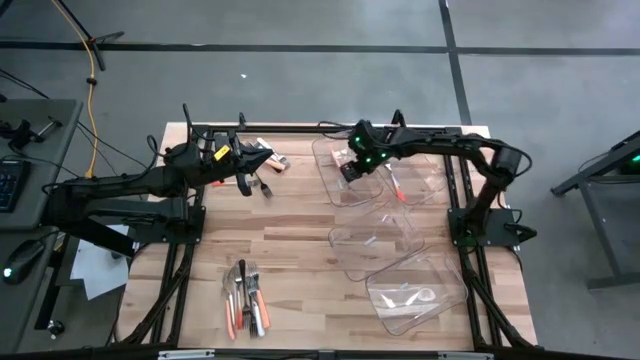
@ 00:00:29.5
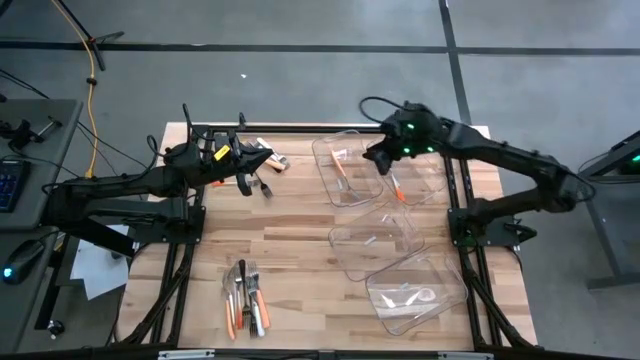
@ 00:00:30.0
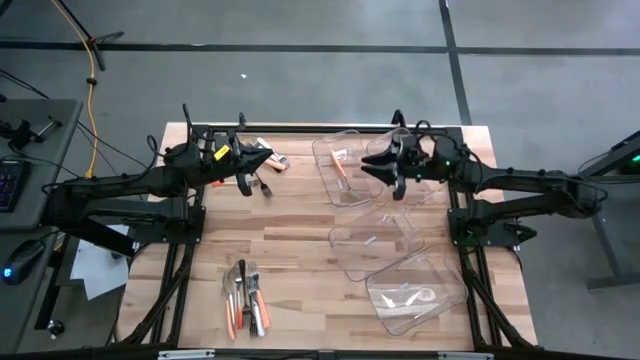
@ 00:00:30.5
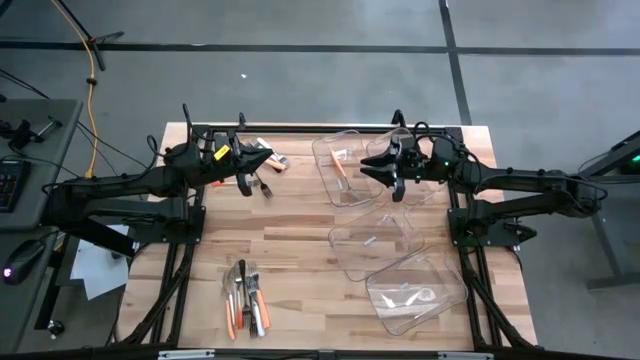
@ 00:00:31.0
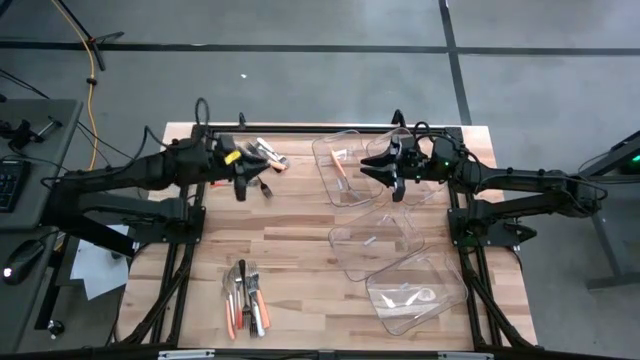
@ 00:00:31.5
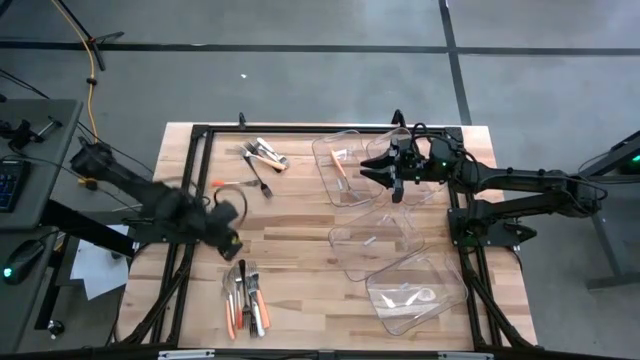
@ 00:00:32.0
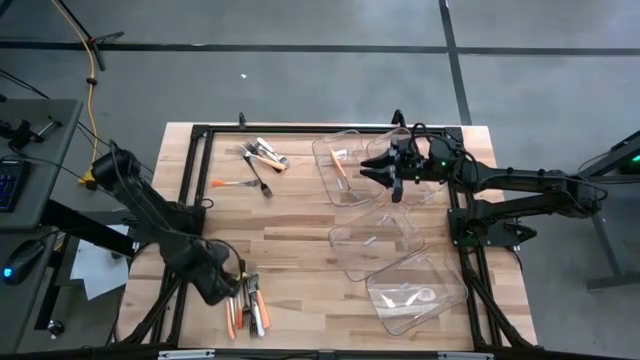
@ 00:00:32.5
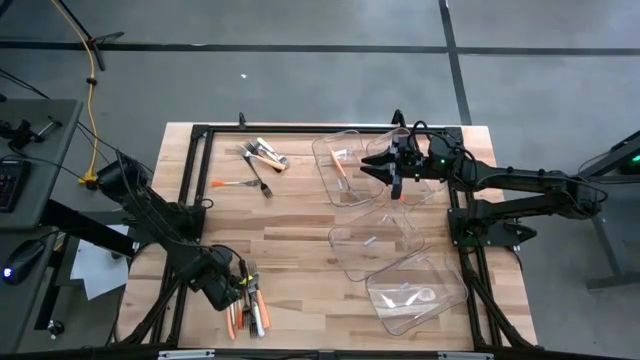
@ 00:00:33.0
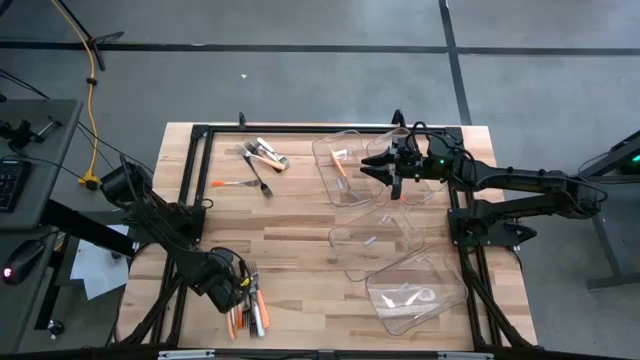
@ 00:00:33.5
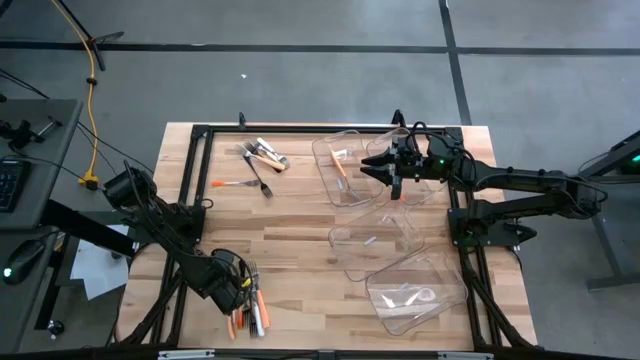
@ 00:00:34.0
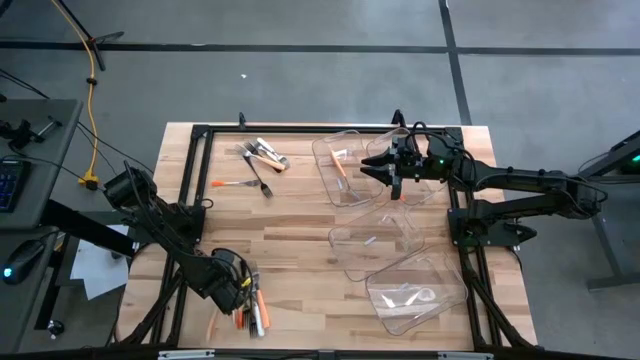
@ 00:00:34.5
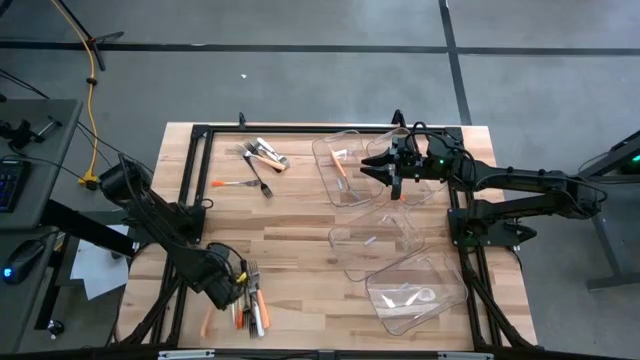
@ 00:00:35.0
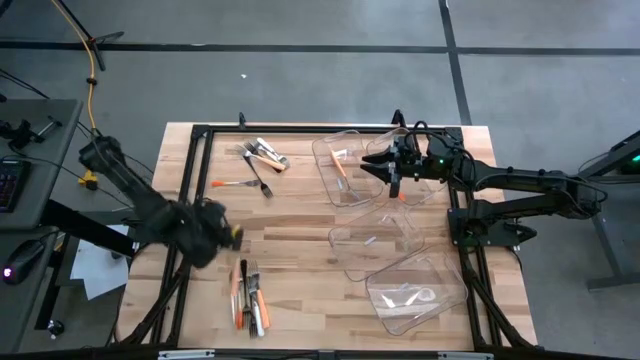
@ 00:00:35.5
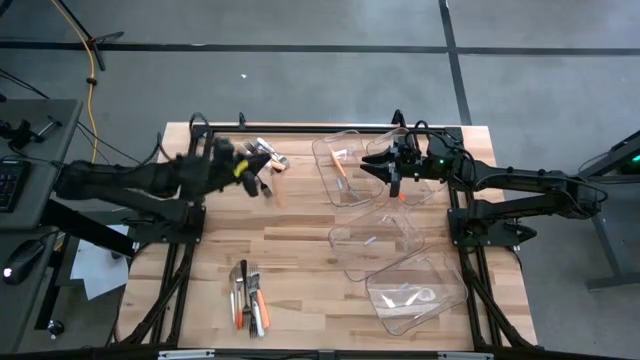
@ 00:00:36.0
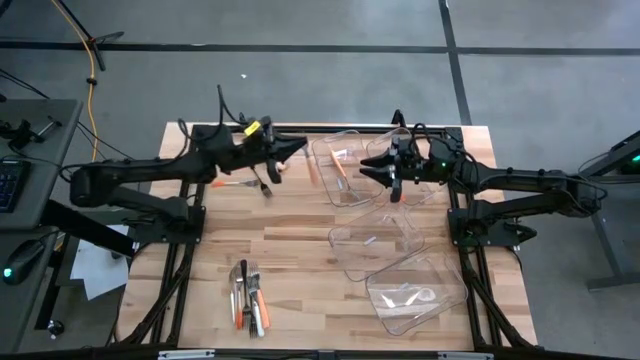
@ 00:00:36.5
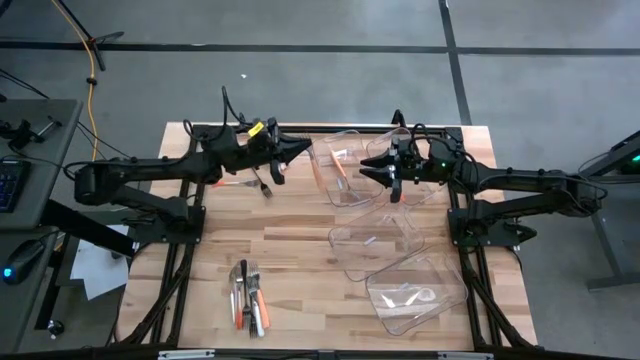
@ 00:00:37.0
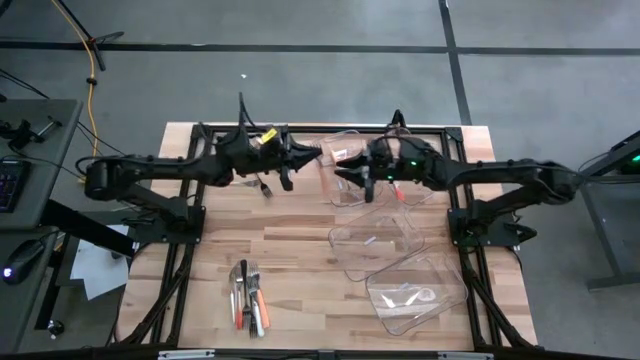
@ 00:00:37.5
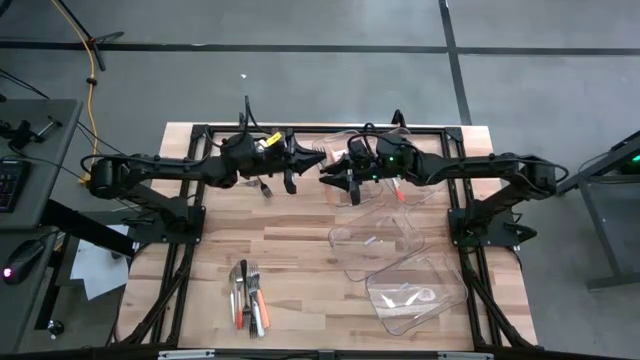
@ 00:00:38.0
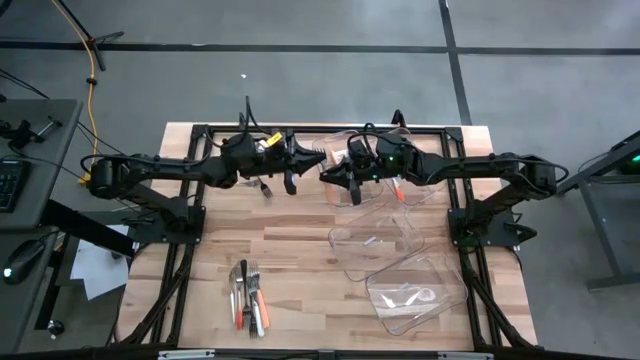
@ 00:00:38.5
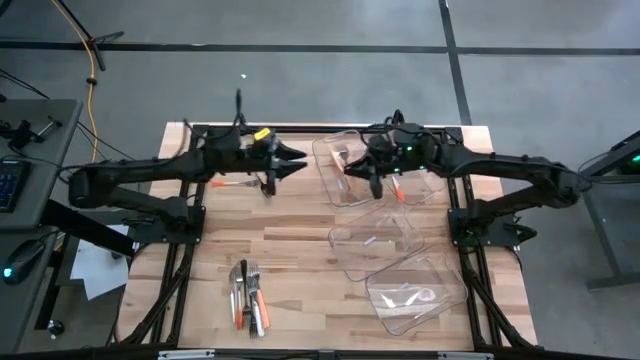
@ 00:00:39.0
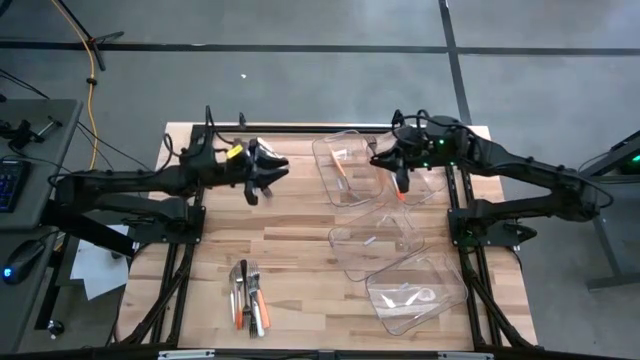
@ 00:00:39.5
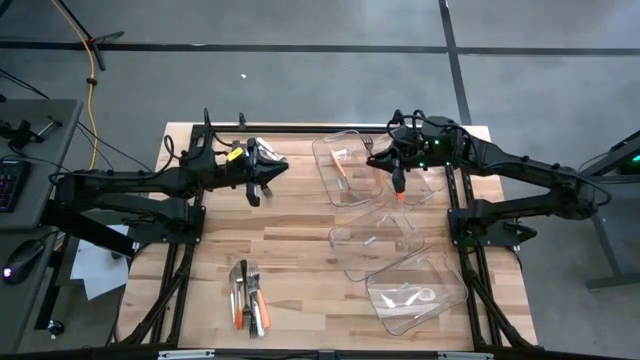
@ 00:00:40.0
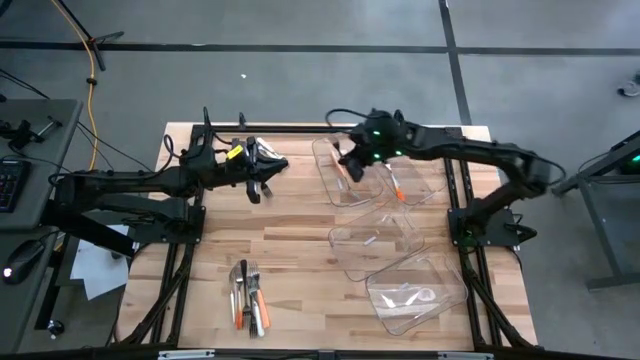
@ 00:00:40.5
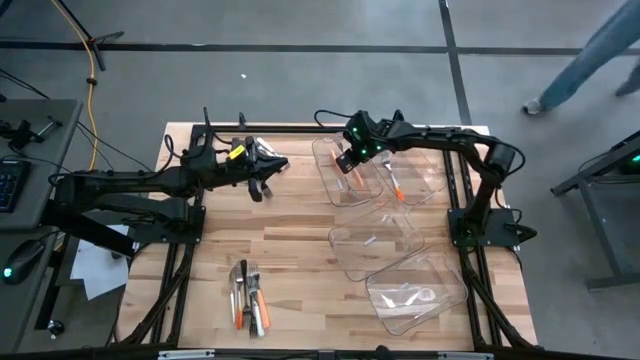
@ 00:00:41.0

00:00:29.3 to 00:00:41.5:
Task: Sort silverware by color (type)
Put the light orange fork into the left transparent bin

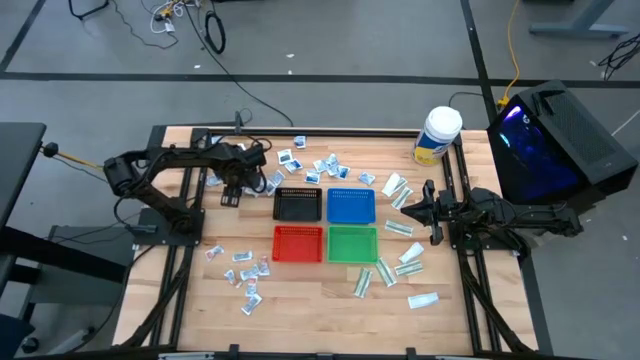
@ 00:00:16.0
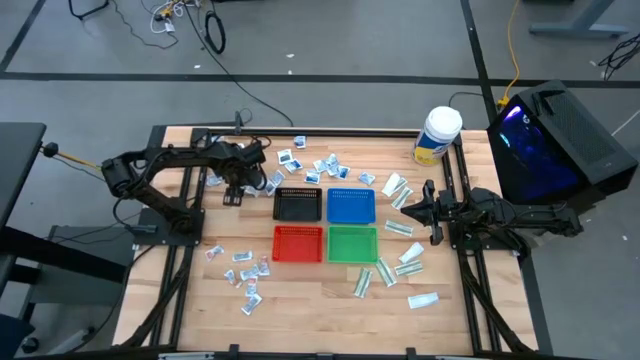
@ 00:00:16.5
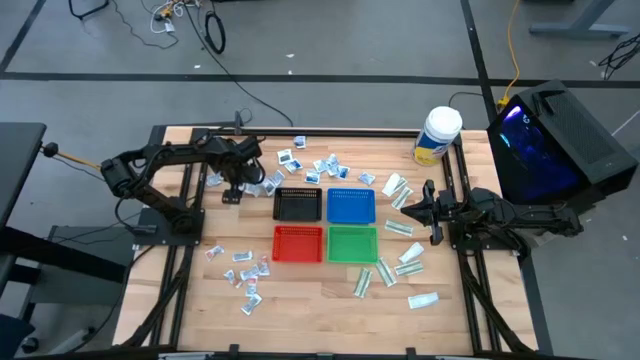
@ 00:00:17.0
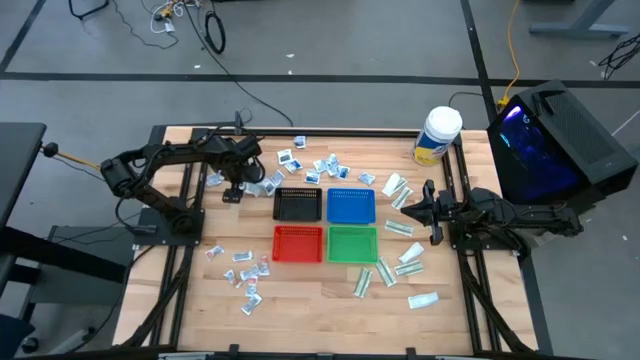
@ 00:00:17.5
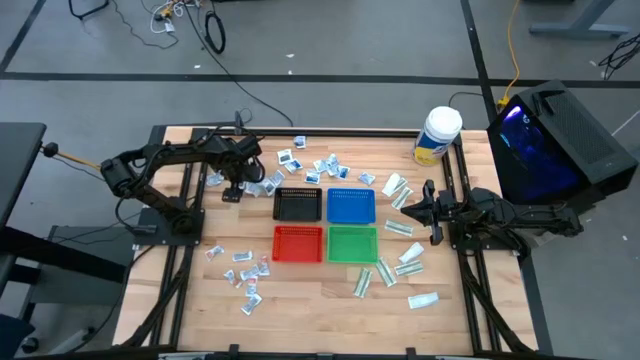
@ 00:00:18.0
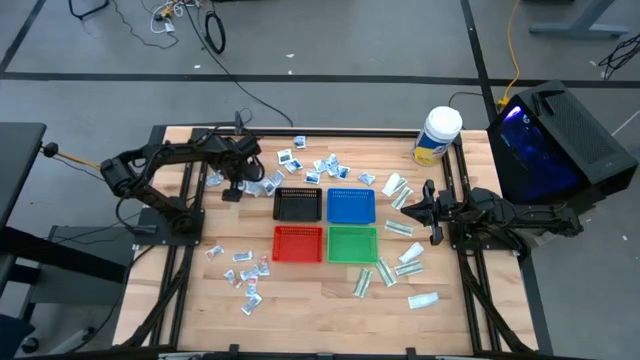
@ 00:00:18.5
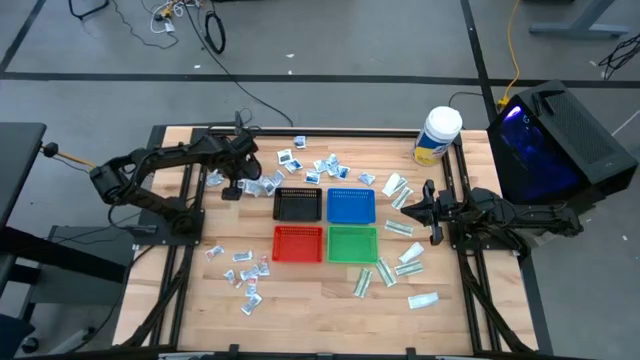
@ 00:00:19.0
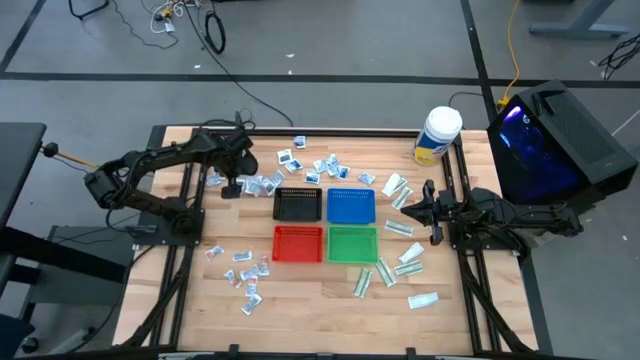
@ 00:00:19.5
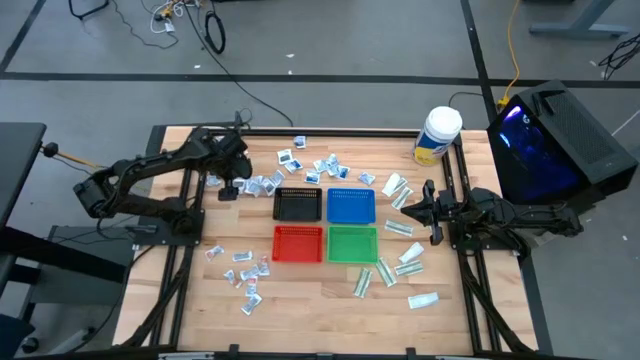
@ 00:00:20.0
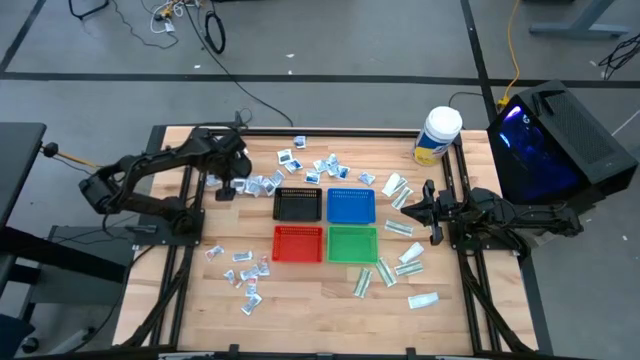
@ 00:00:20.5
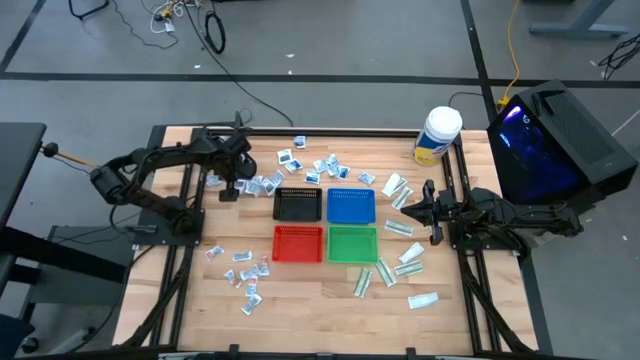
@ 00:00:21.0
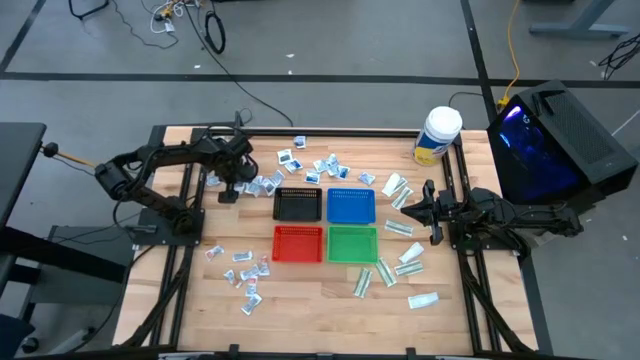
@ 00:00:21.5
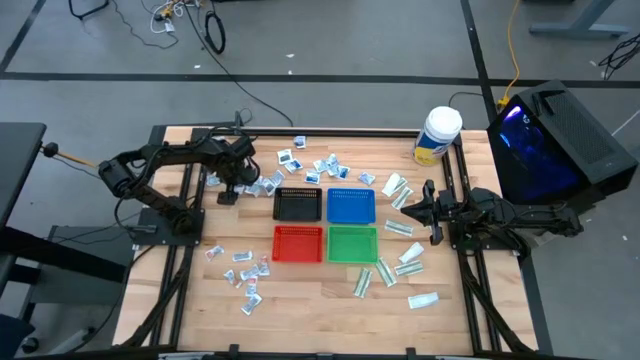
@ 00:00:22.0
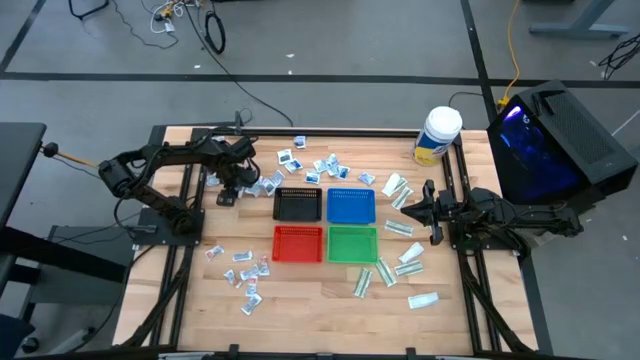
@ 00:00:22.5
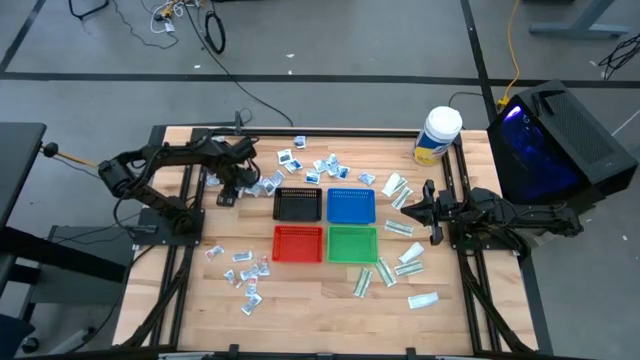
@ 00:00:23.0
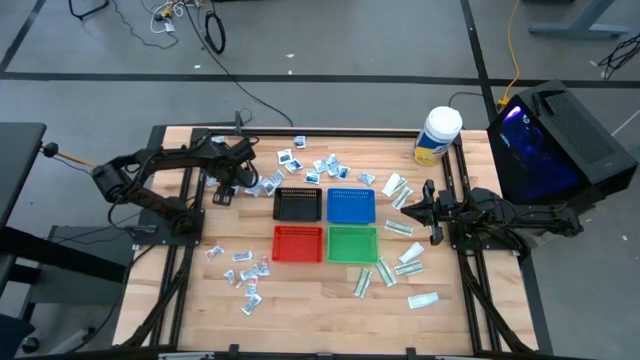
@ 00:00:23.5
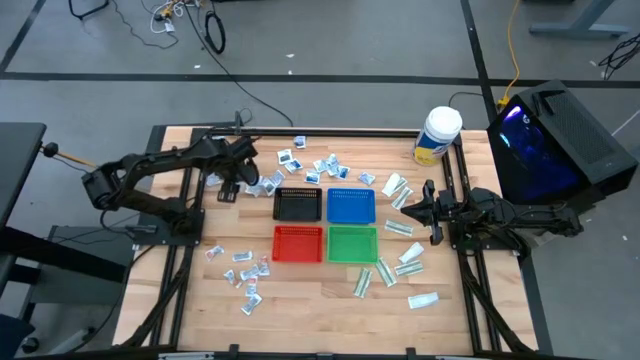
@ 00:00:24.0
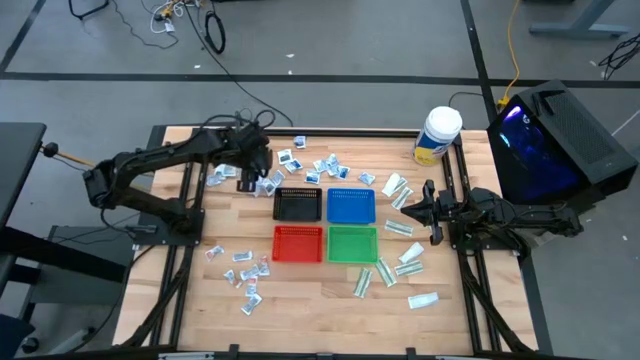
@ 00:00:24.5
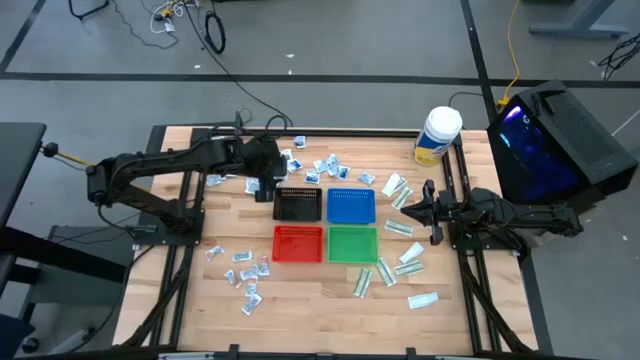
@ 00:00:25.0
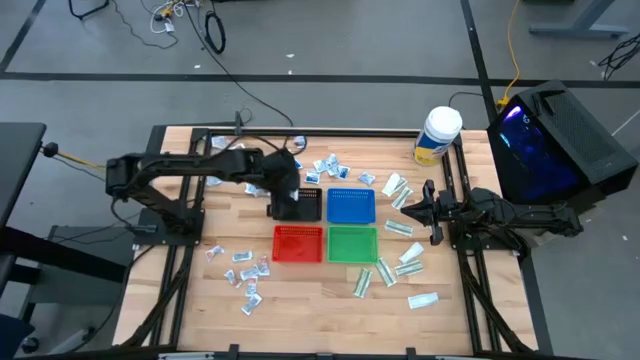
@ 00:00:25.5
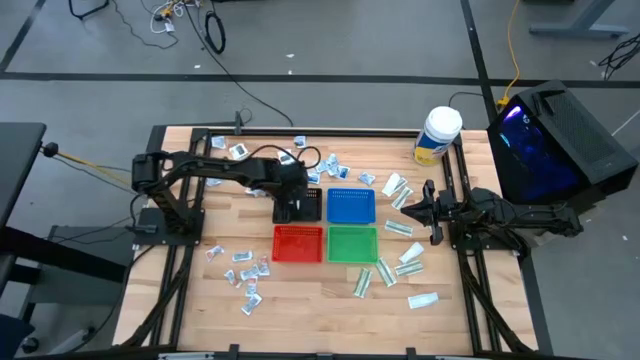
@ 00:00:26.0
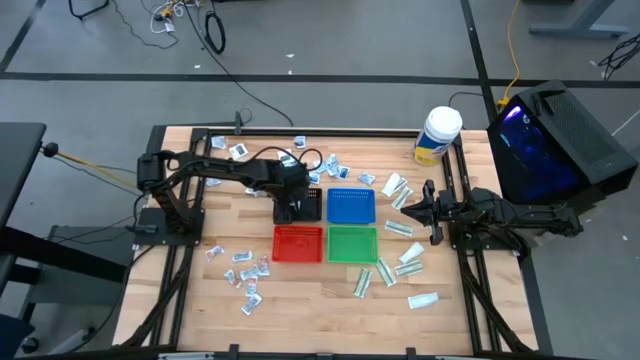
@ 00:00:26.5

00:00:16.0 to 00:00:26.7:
Task: Pick & Place First Aid Supplies
Put the gray towelette pack into the black bin
